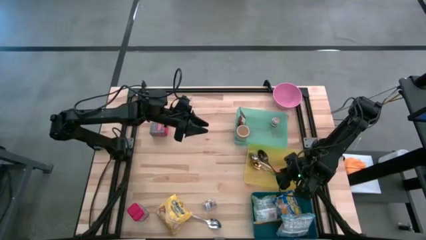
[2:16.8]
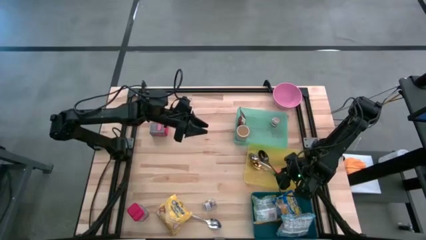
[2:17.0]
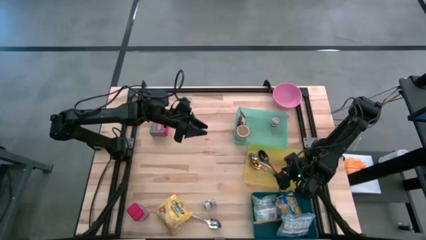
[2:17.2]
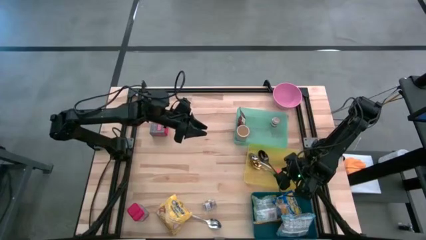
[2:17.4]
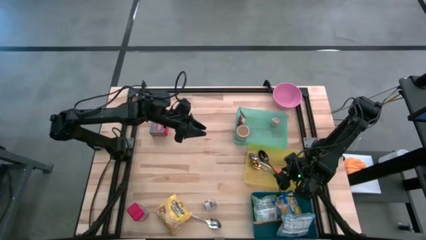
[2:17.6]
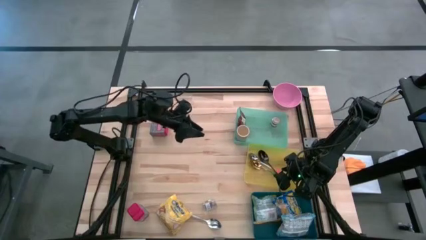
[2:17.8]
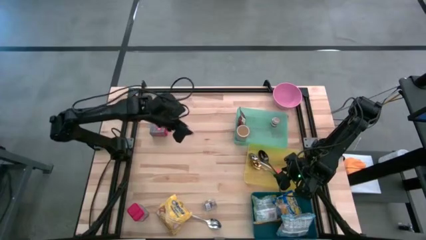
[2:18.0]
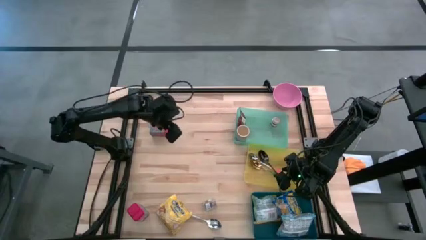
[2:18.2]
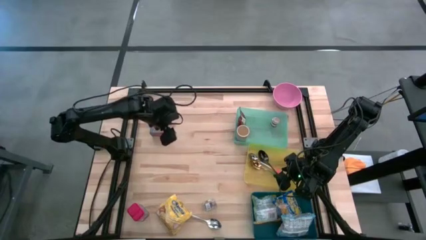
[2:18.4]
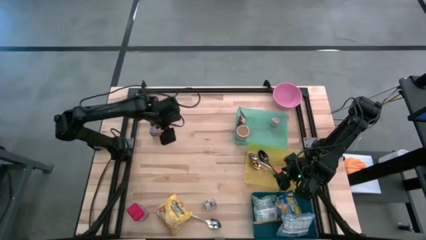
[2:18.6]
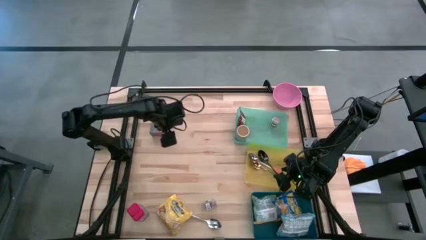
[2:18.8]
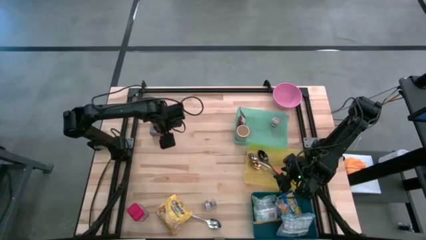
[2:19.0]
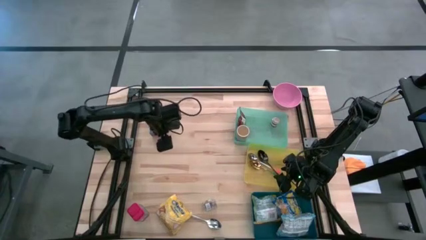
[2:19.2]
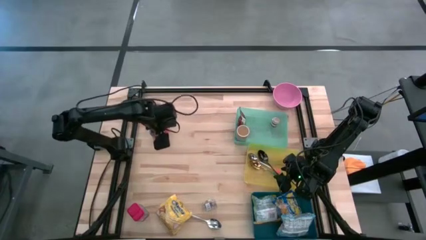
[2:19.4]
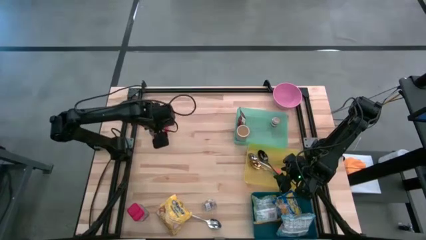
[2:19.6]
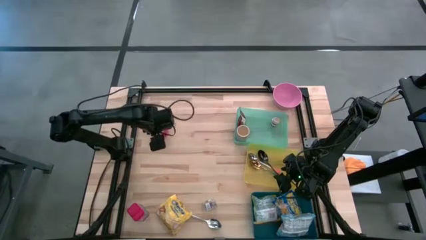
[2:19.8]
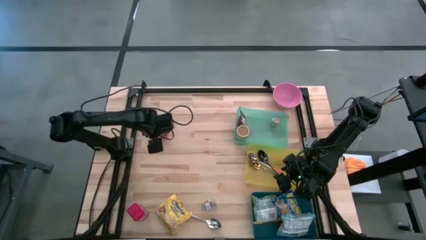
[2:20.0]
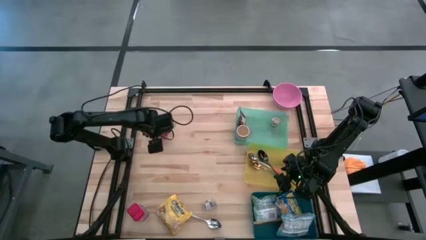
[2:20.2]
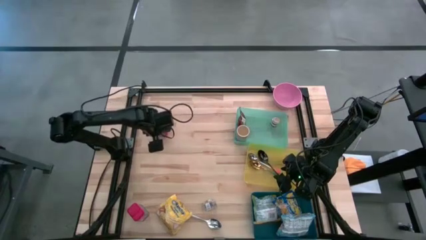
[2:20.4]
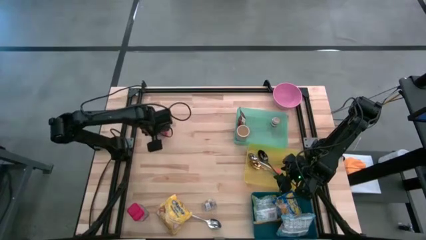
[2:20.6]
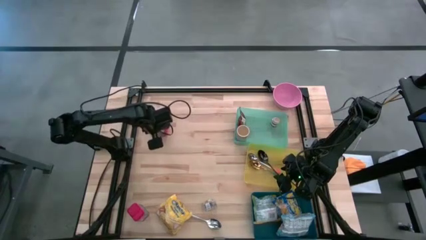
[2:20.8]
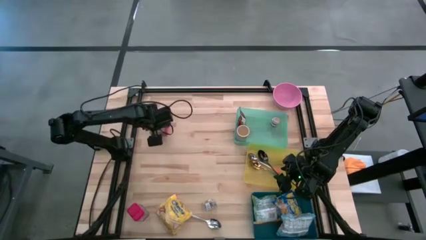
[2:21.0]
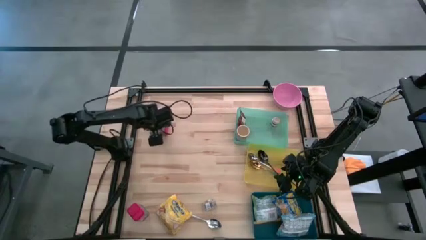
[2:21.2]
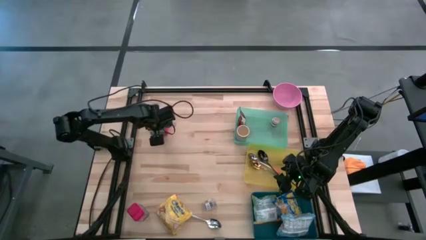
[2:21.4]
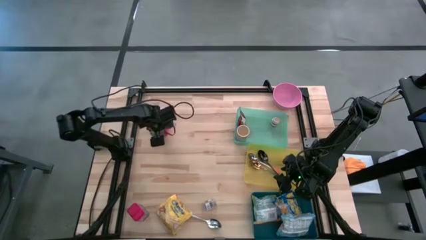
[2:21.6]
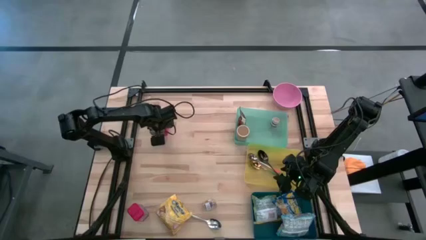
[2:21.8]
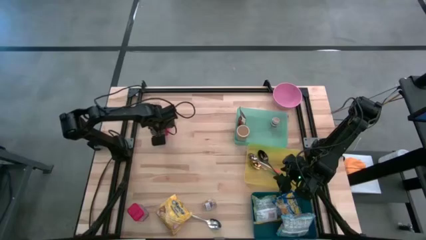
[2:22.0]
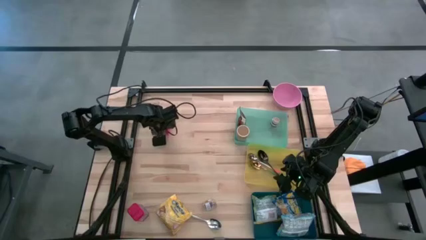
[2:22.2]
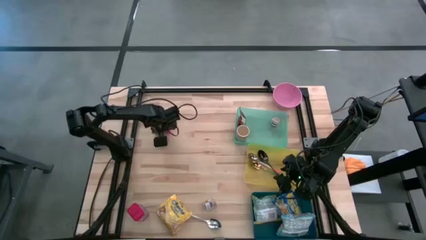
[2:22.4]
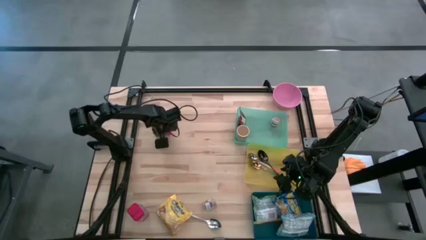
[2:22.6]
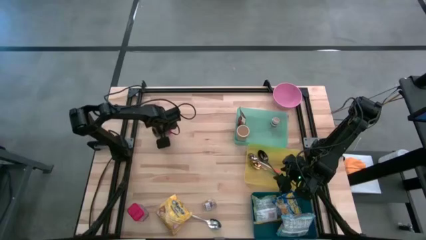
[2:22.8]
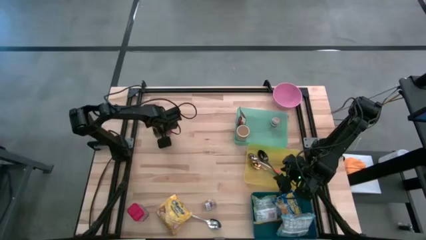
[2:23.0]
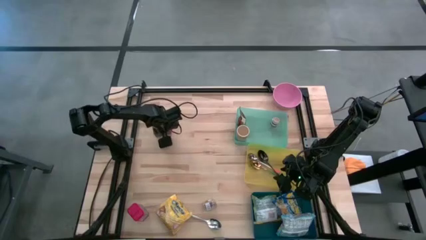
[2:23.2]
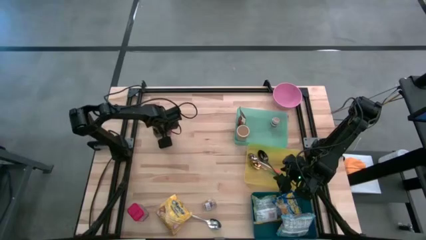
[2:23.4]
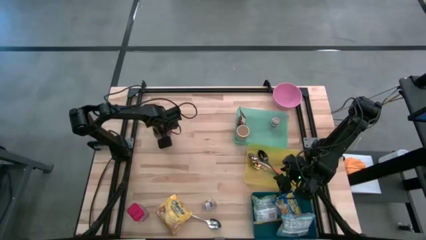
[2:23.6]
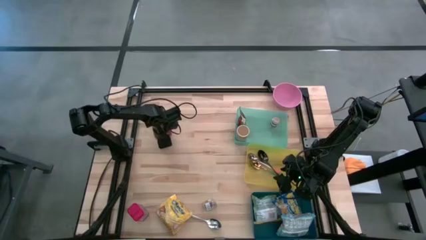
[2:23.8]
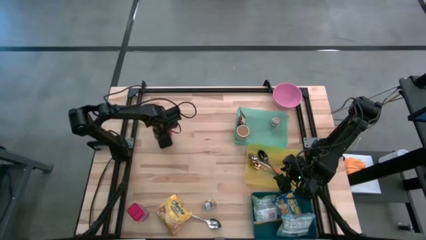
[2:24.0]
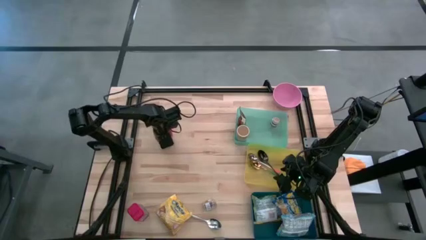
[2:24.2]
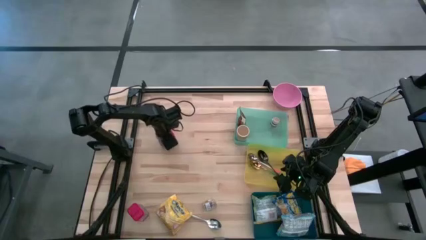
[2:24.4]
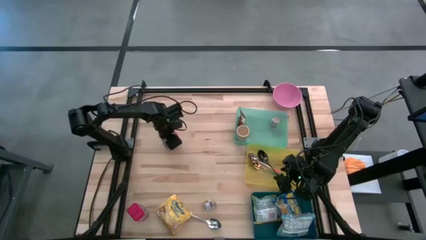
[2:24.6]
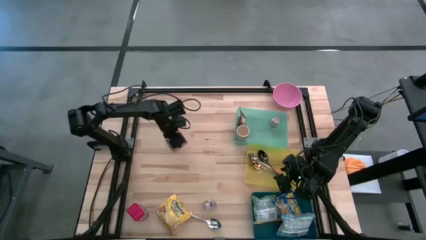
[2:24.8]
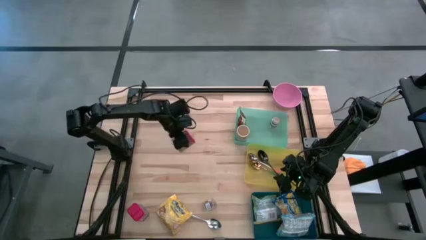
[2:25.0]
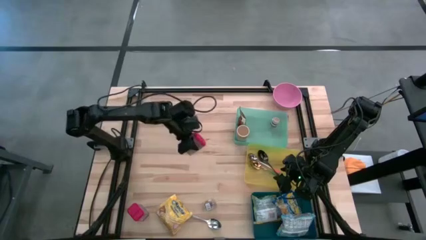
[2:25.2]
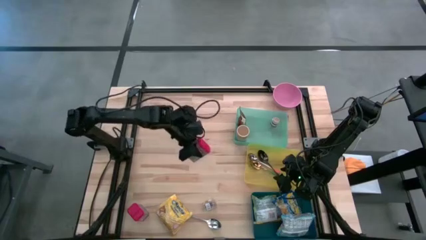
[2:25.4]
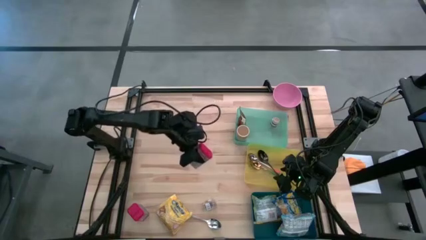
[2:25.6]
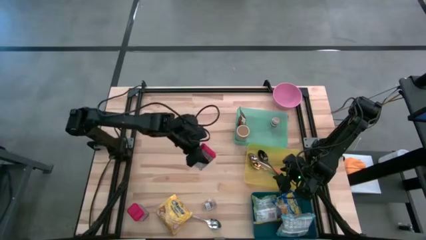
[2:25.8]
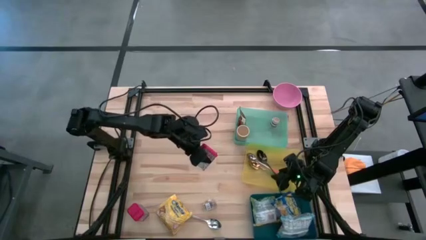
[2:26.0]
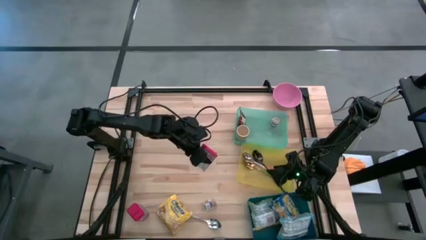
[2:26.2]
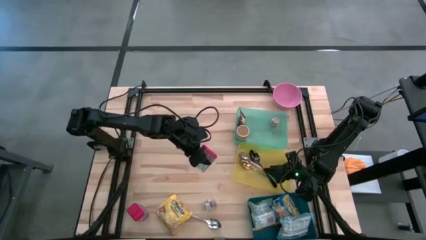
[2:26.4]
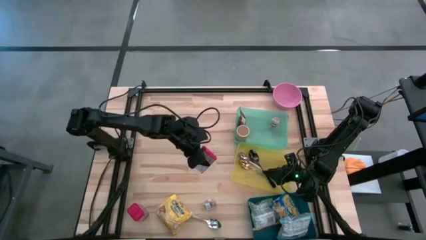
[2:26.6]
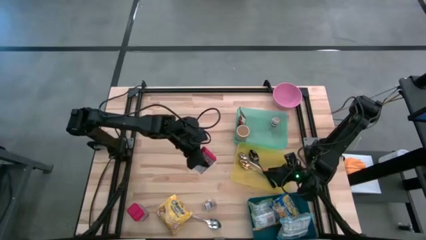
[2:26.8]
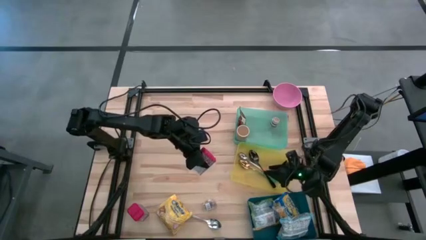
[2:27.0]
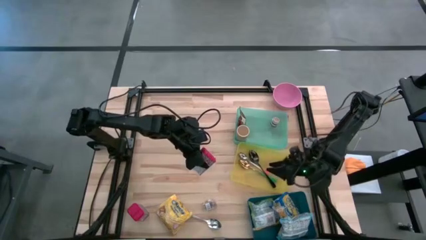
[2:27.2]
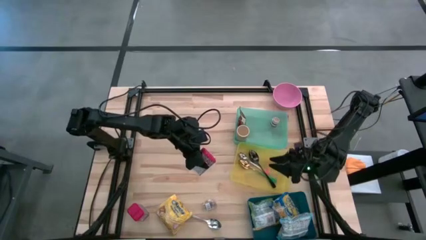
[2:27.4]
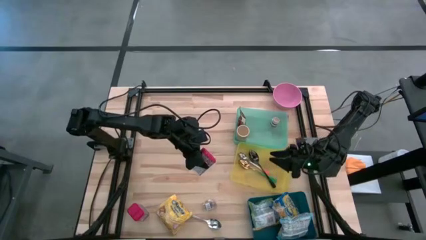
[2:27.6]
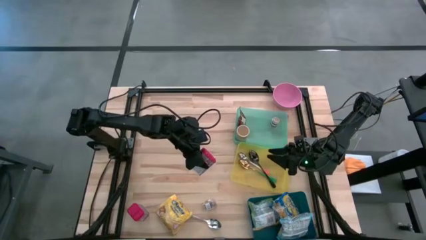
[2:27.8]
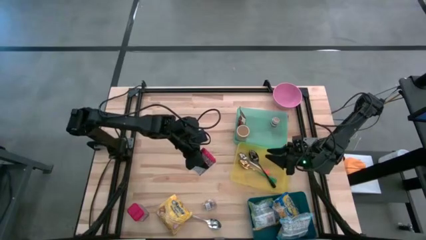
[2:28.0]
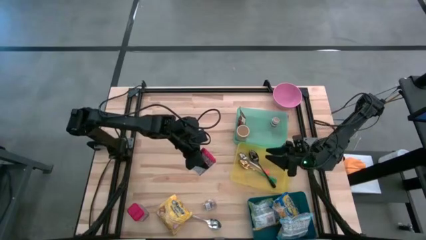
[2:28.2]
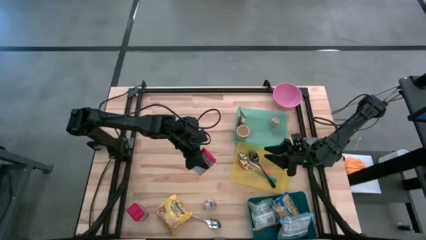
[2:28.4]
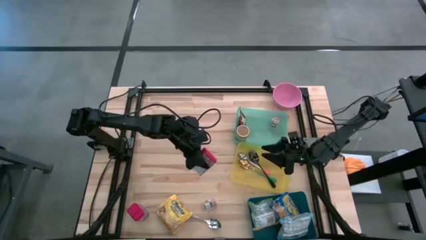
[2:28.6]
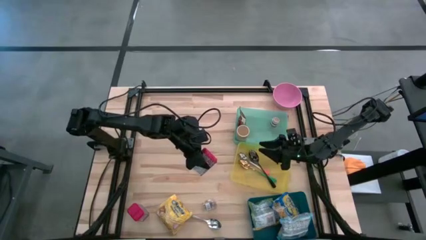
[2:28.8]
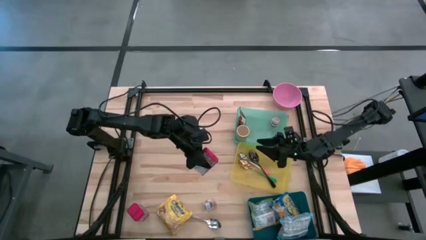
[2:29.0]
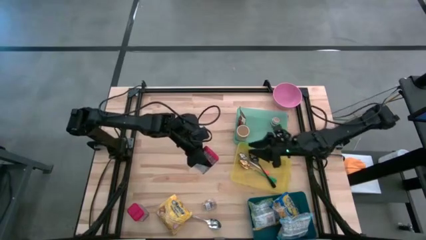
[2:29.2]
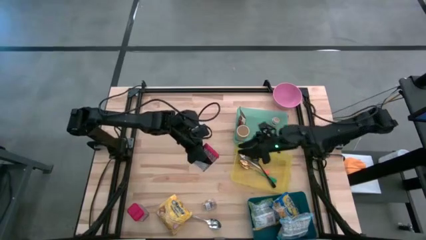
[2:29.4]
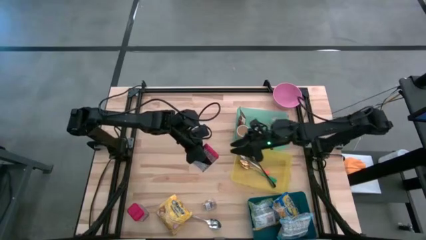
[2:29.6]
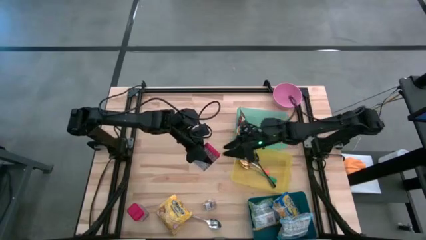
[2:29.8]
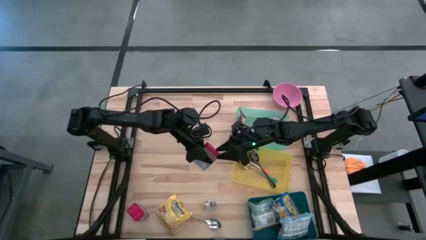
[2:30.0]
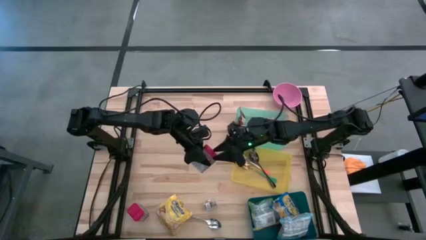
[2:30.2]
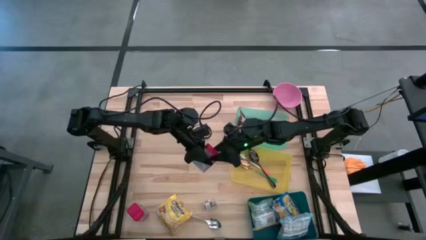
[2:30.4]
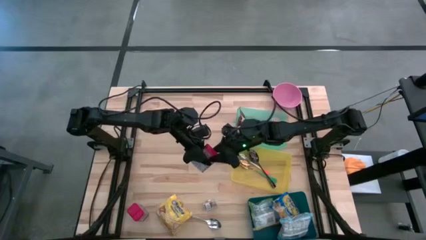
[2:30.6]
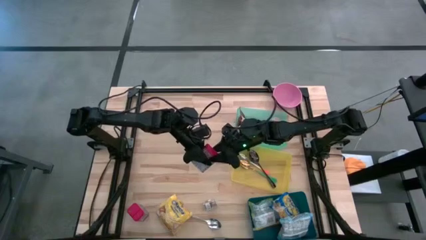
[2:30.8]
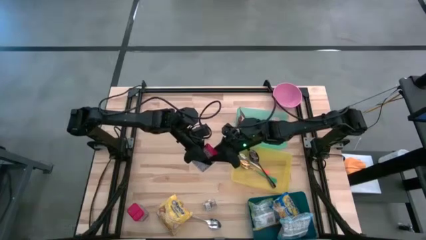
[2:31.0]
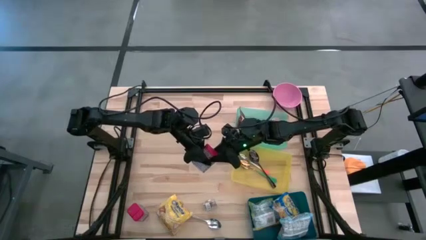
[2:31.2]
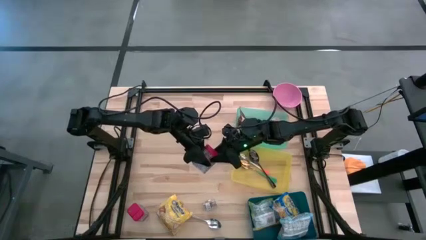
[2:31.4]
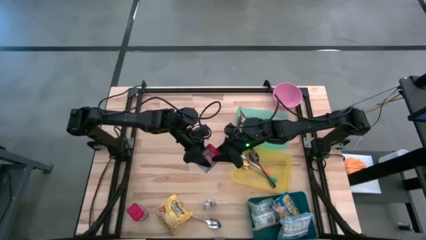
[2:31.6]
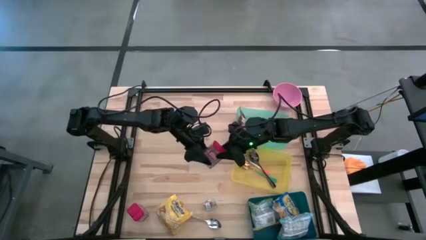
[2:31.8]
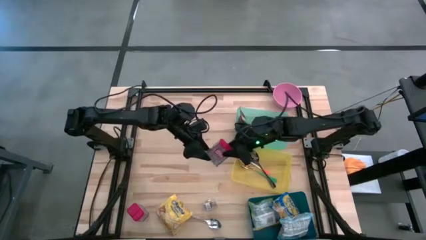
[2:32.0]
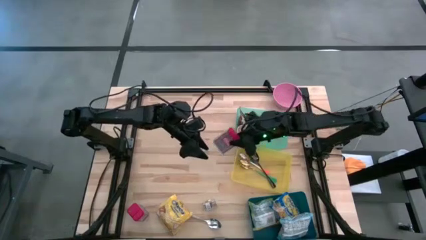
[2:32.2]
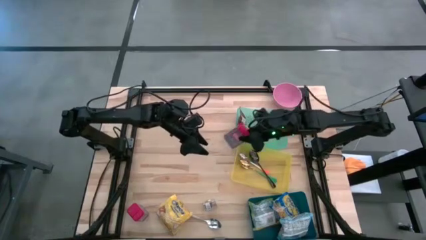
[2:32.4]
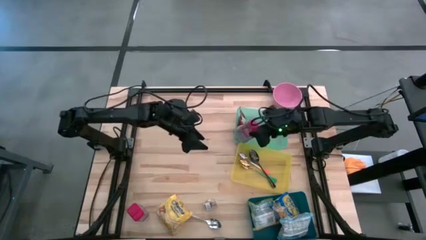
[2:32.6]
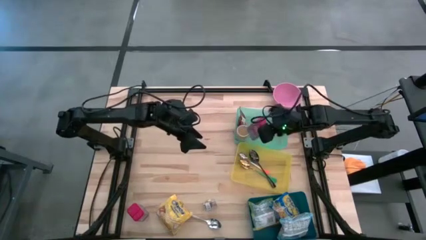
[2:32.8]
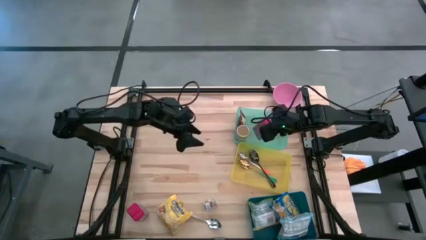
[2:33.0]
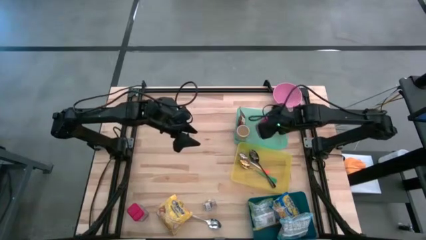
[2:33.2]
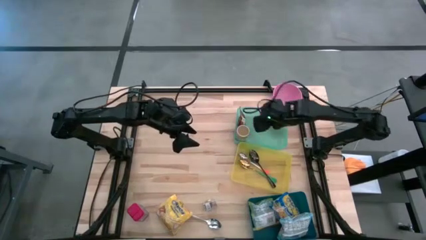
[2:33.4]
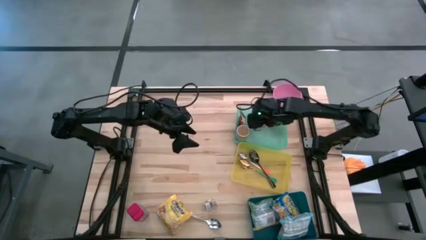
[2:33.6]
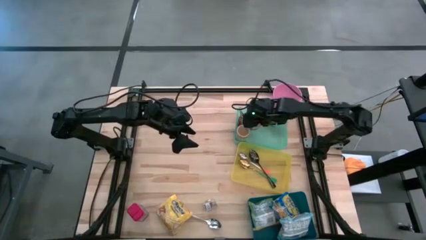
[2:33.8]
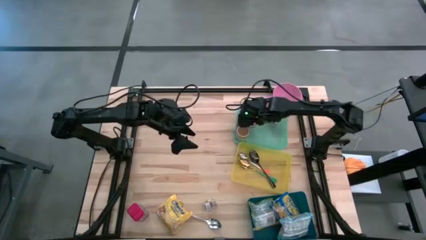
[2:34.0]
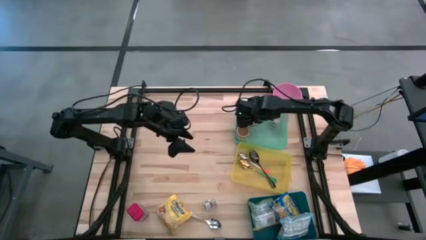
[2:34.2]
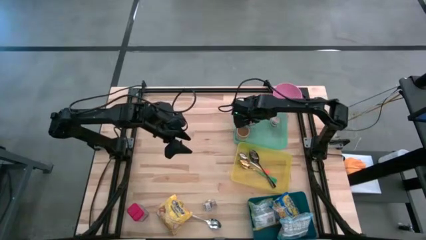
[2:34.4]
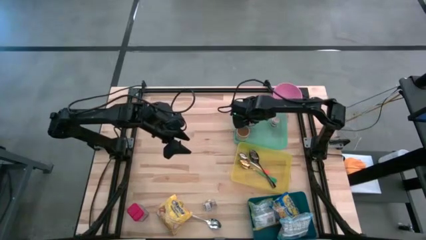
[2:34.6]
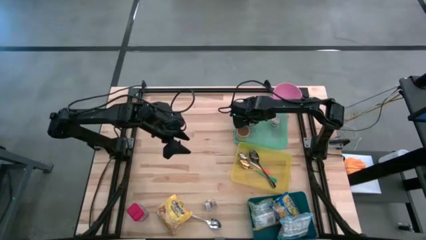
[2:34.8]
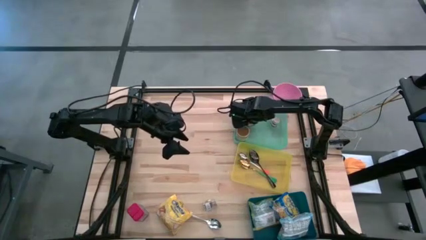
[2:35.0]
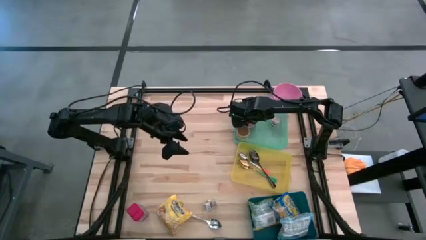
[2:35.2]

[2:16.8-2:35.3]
Put the top red seasoning can into the green bin
